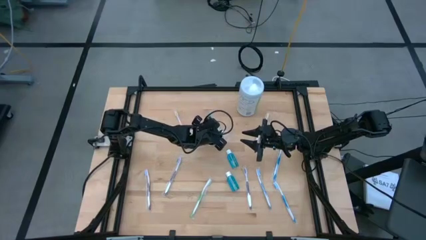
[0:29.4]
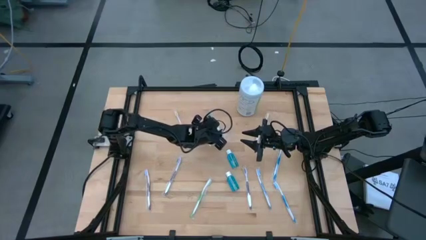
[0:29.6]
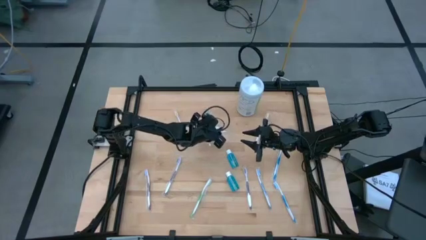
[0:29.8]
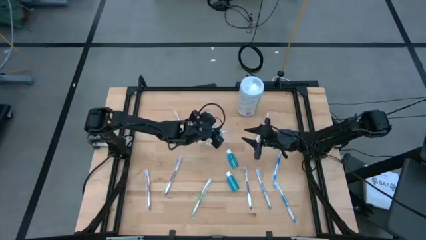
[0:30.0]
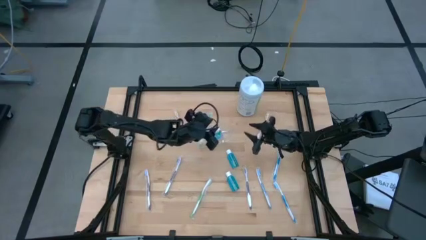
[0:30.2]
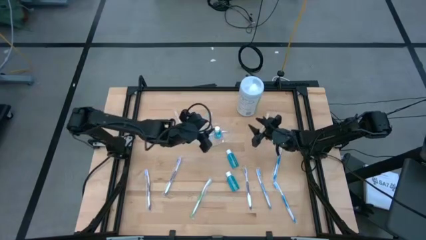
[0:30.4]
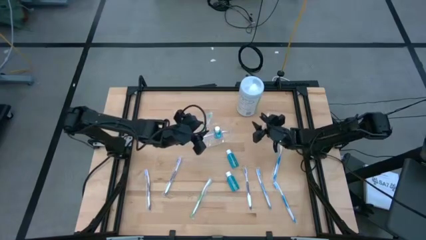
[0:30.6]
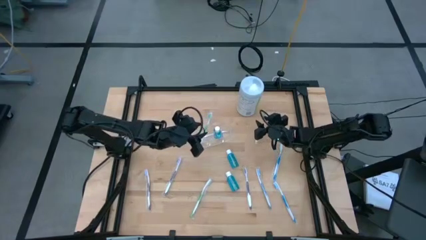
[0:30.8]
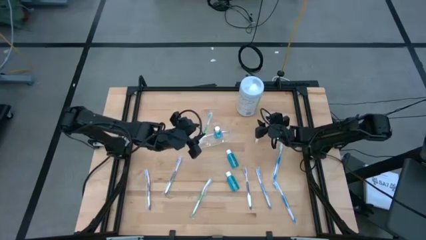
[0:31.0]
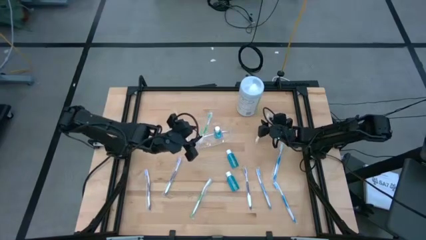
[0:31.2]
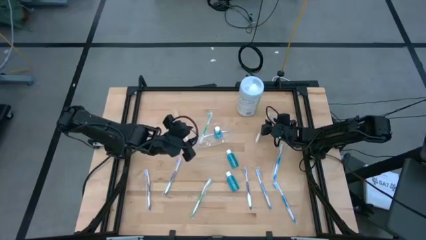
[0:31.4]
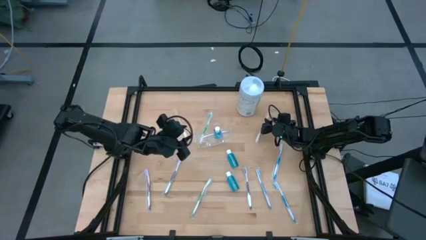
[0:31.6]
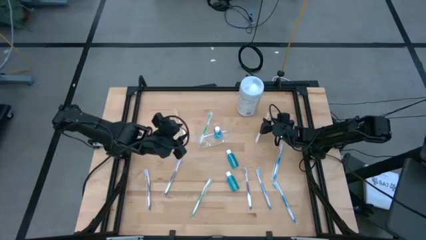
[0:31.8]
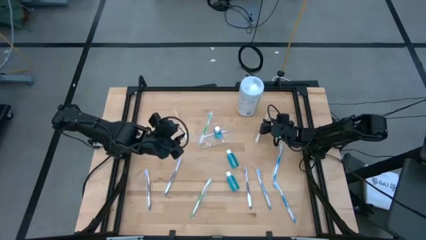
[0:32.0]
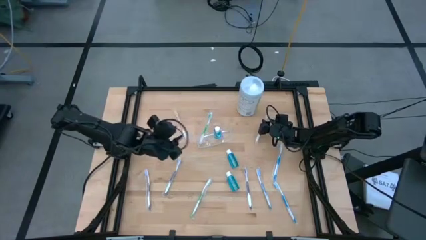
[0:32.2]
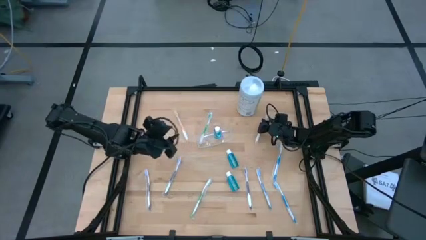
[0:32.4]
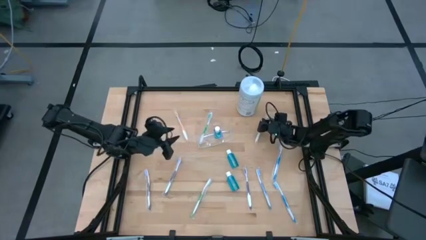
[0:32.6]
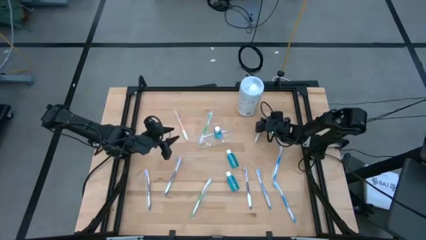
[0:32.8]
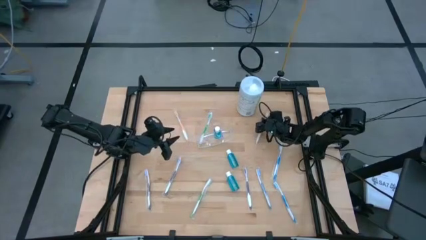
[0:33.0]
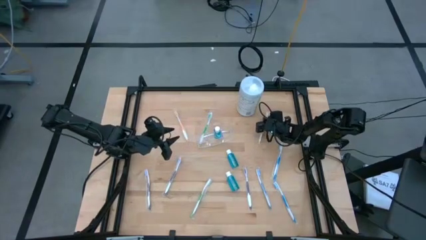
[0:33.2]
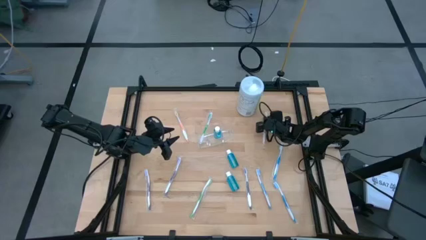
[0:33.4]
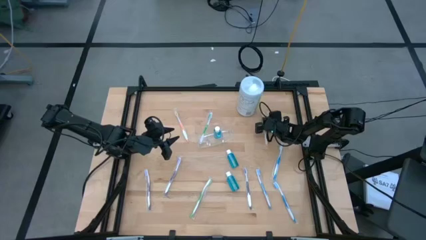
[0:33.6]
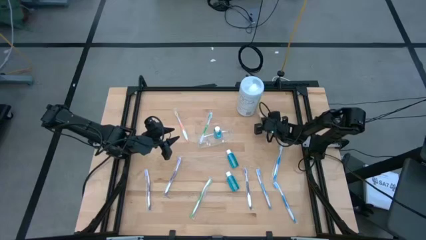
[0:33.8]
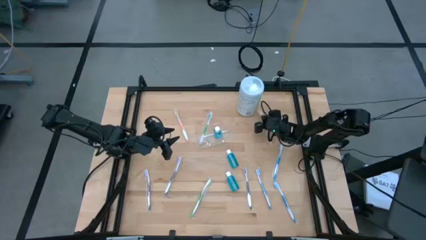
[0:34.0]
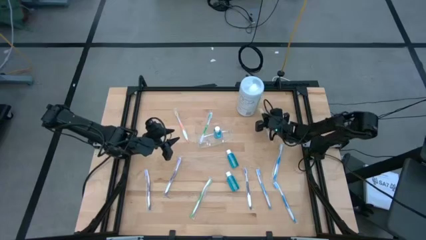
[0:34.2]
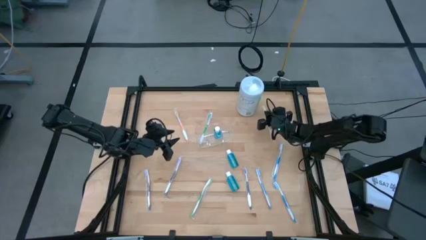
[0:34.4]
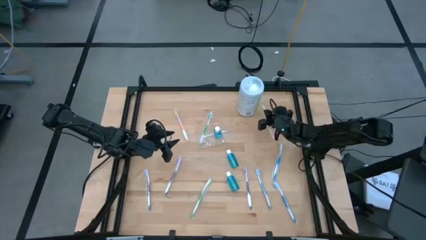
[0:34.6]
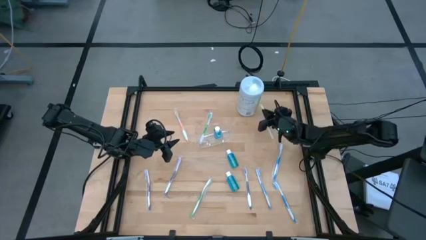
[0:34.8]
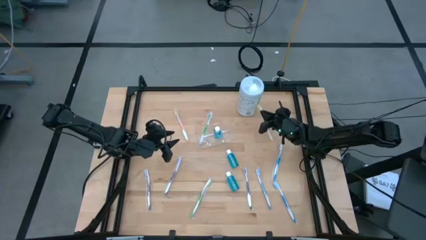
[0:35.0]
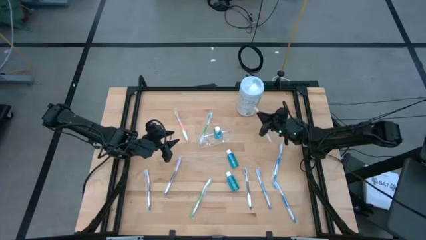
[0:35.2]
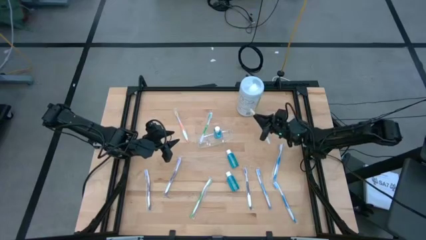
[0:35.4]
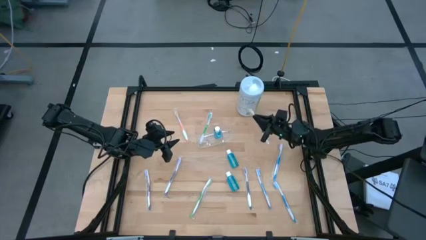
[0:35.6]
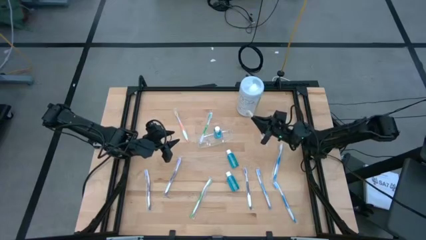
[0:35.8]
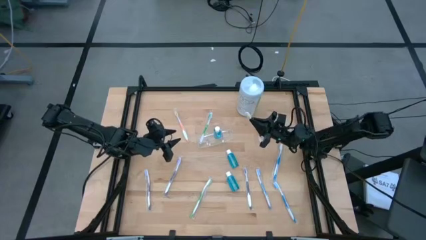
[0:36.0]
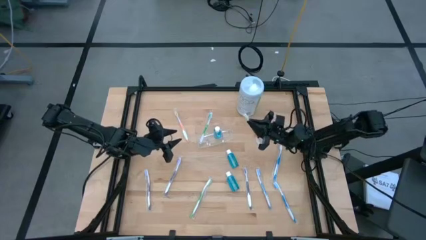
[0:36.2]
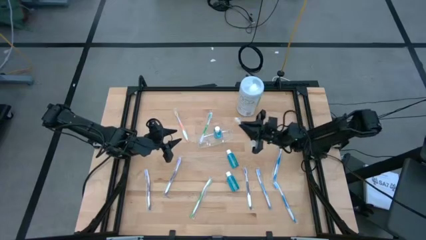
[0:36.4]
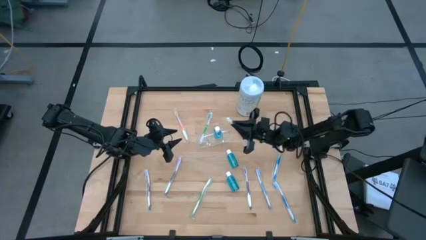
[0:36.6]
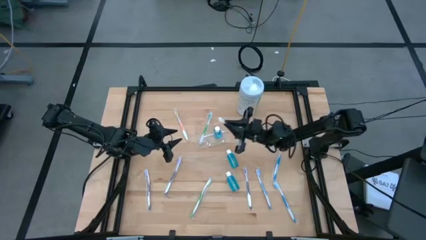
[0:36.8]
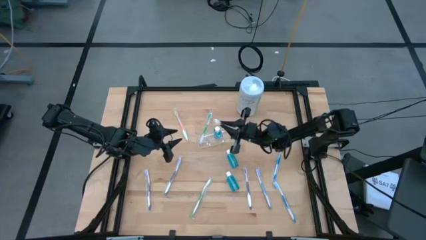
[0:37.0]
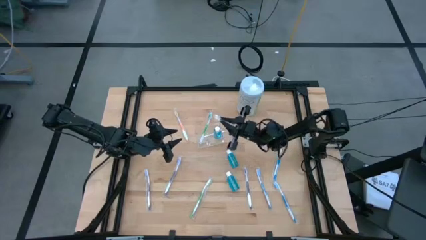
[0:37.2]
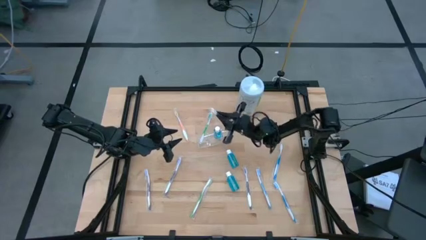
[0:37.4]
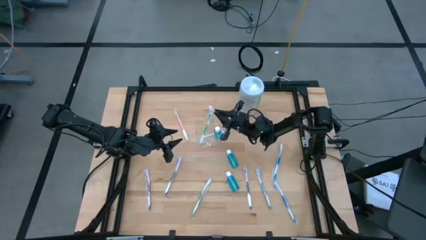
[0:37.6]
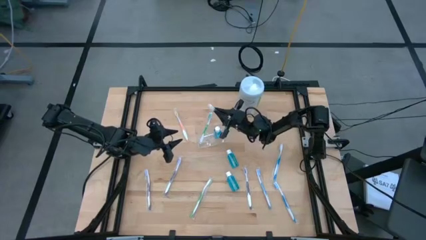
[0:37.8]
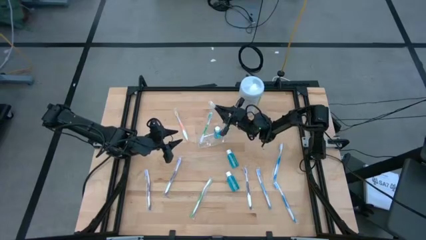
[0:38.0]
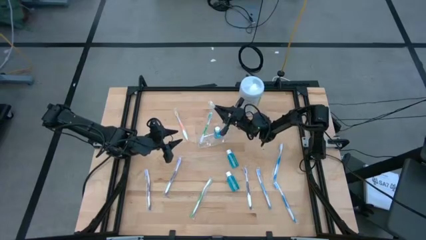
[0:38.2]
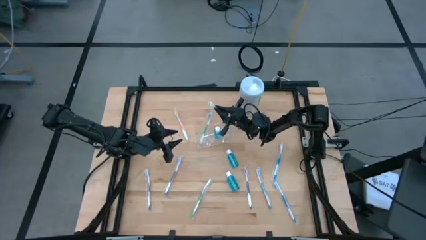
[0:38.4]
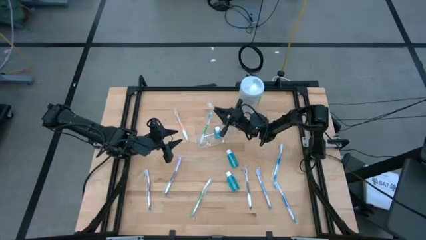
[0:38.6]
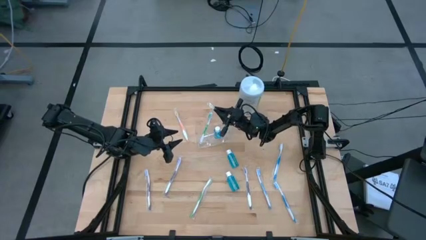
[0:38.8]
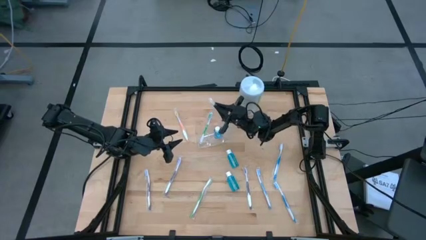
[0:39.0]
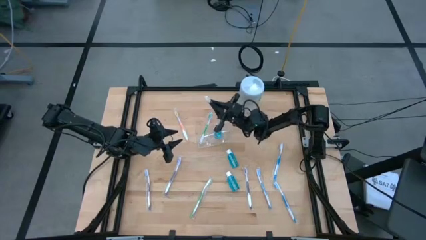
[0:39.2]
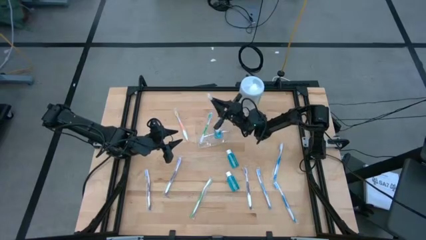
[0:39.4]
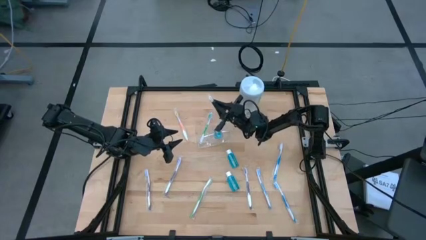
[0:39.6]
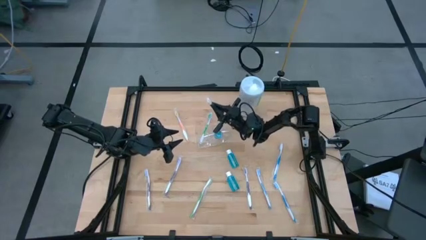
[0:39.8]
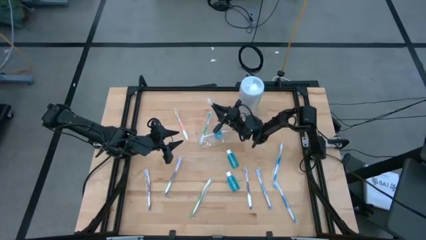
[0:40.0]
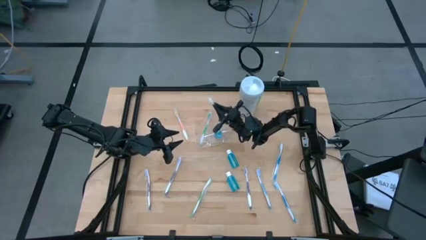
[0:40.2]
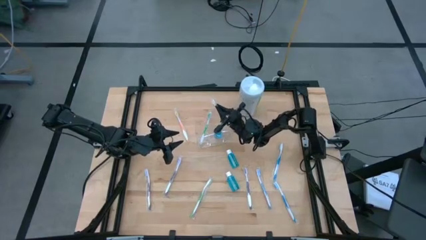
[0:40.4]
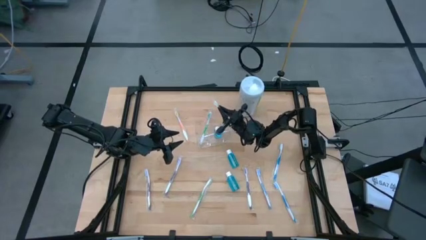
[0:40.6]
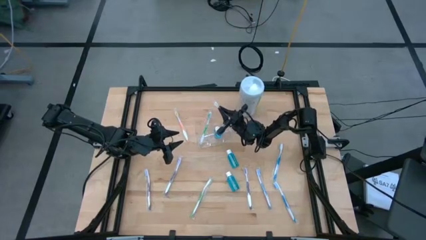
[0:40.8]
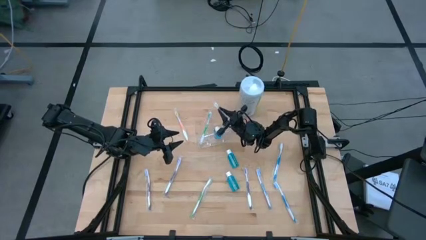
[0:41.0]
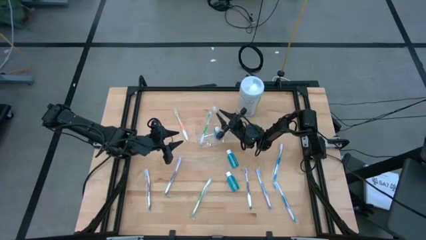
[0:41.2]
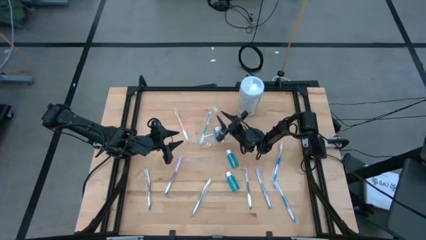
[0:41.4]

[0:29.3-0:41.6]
Task: Pick & Place toothbrushing station
Put the right orange toothbrush into the transparent organizer
